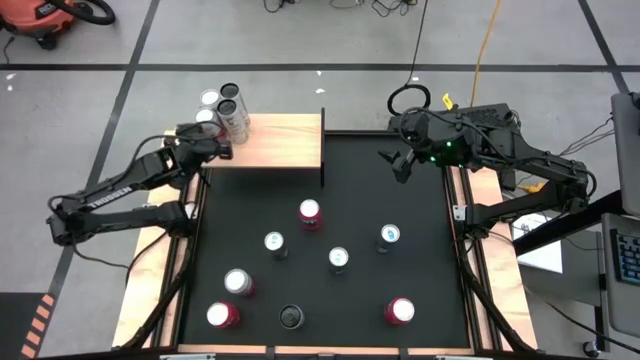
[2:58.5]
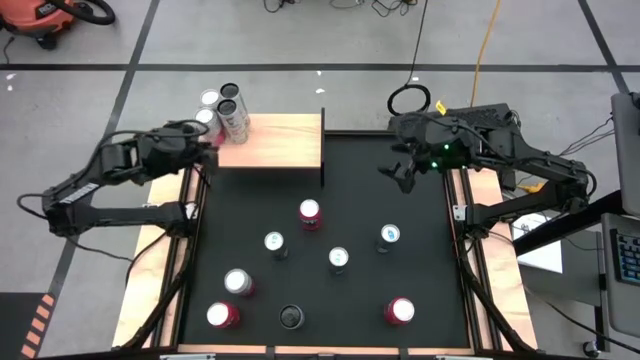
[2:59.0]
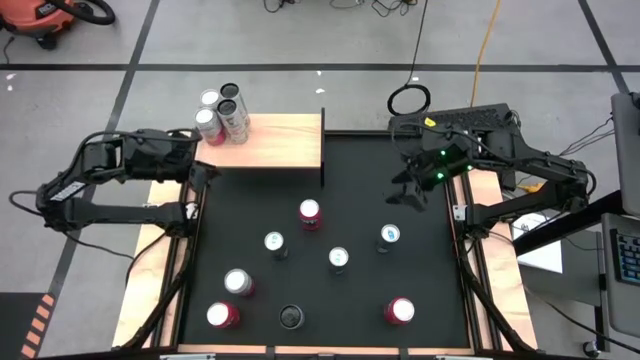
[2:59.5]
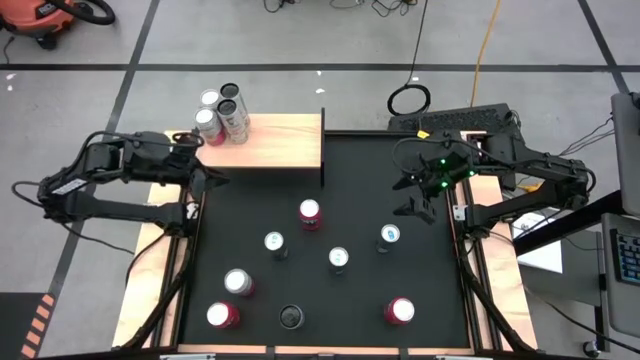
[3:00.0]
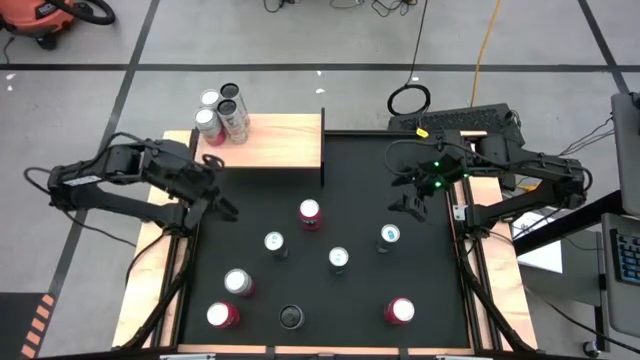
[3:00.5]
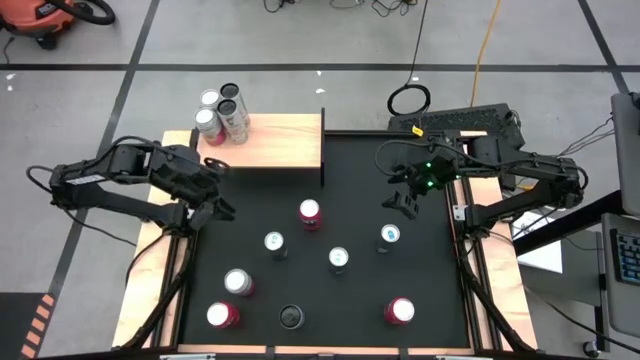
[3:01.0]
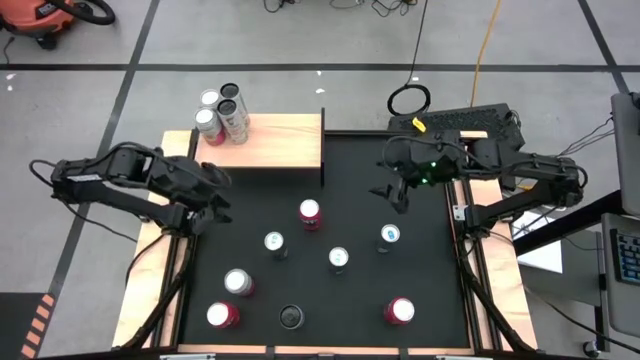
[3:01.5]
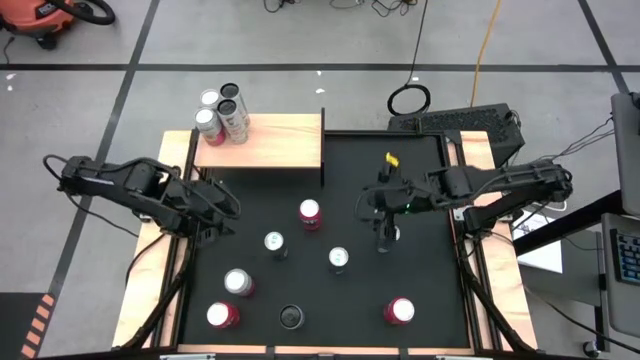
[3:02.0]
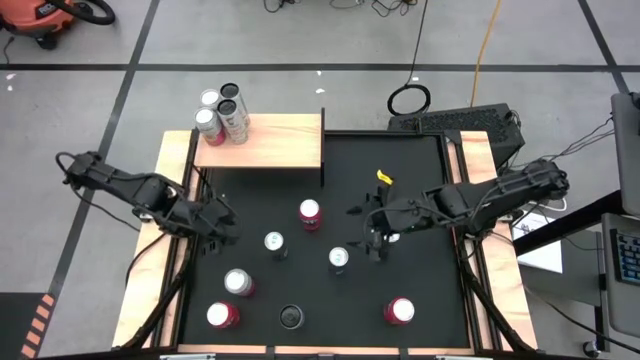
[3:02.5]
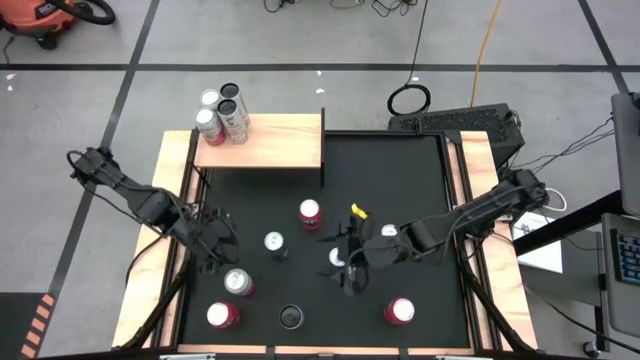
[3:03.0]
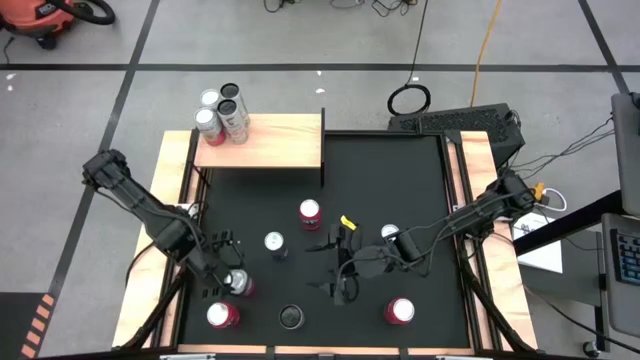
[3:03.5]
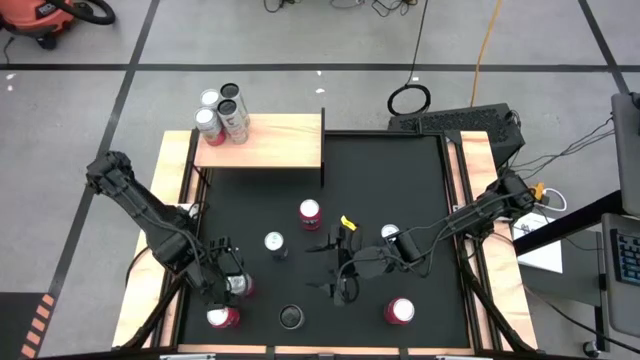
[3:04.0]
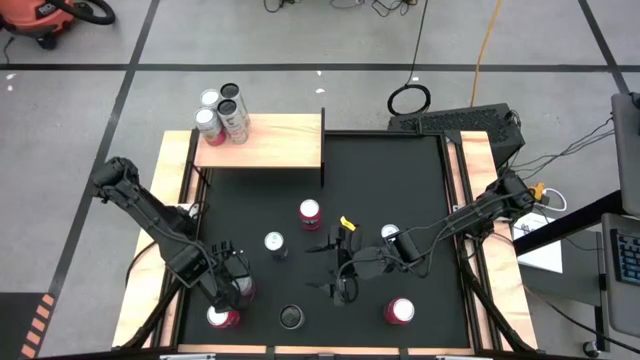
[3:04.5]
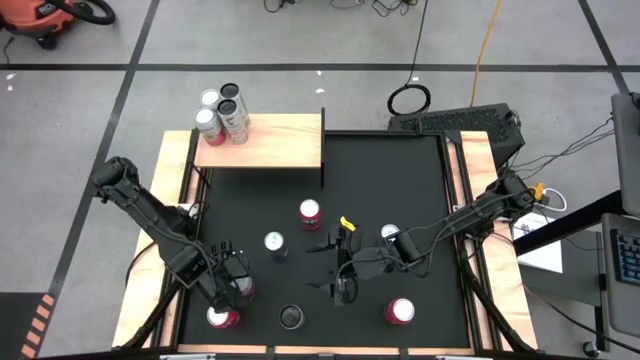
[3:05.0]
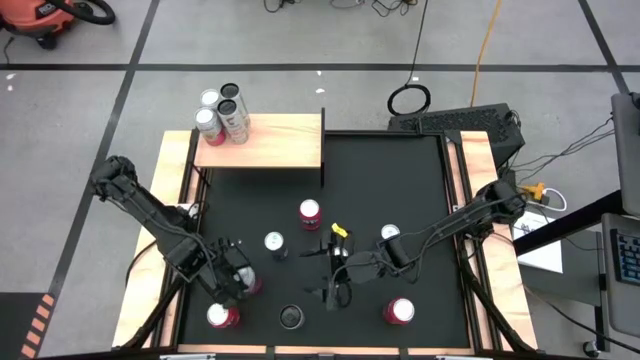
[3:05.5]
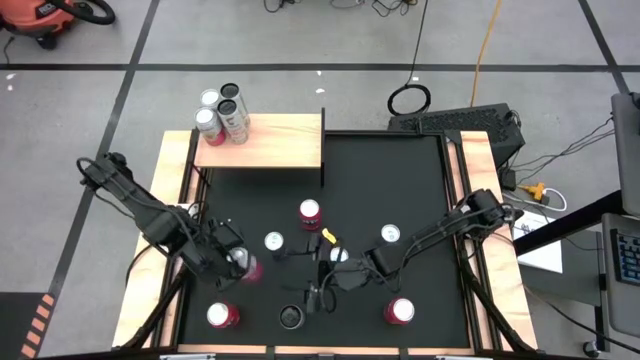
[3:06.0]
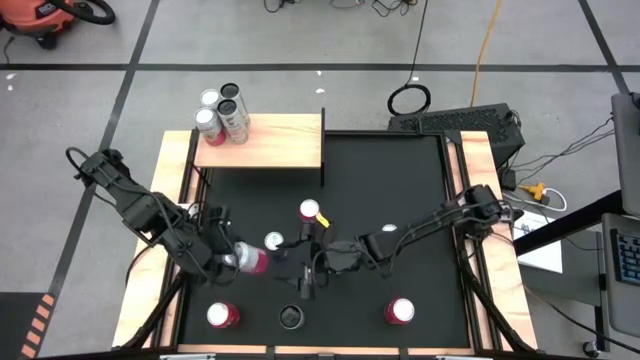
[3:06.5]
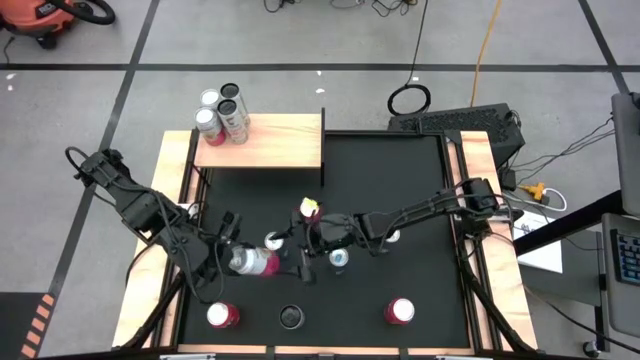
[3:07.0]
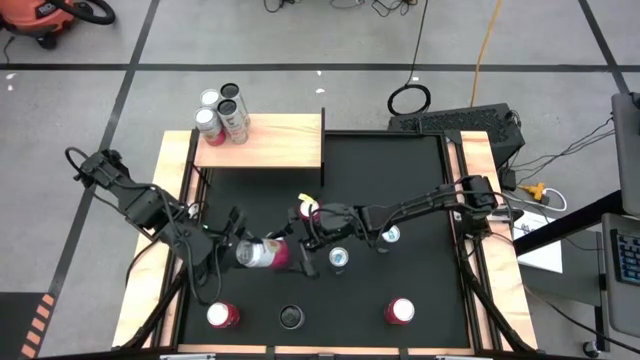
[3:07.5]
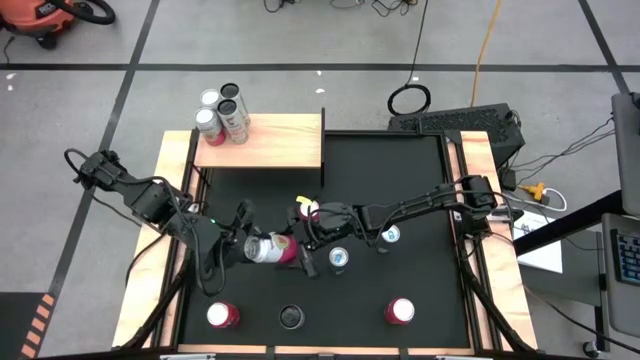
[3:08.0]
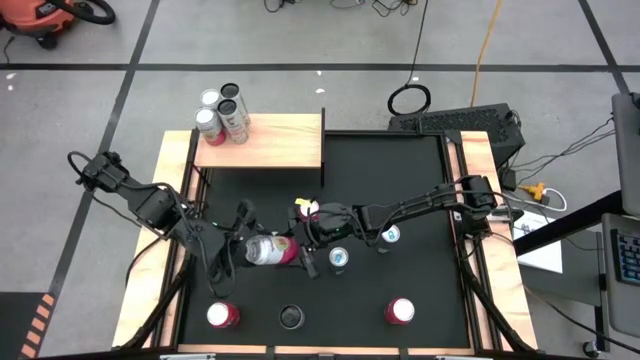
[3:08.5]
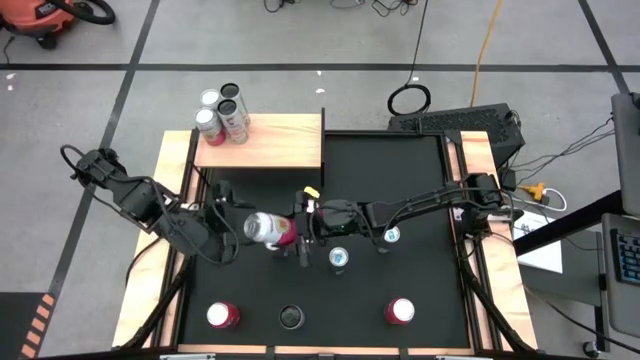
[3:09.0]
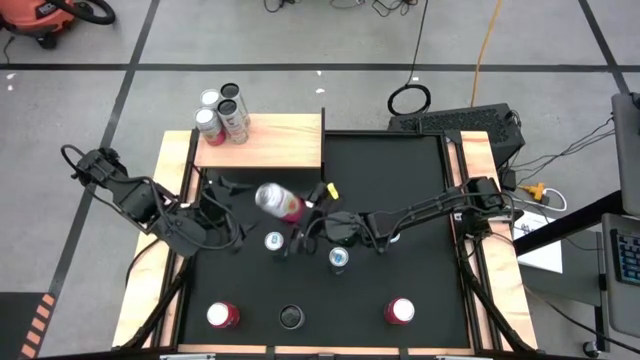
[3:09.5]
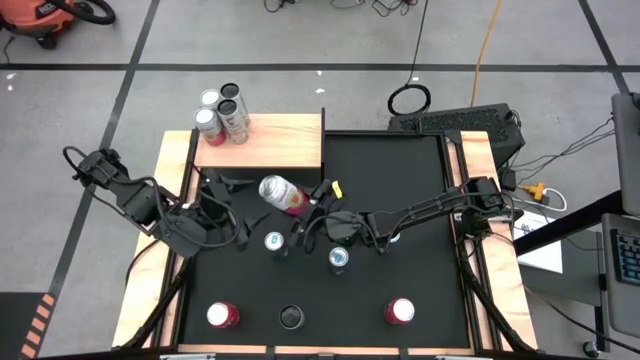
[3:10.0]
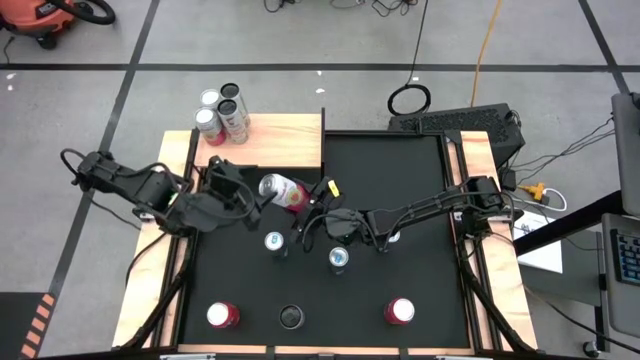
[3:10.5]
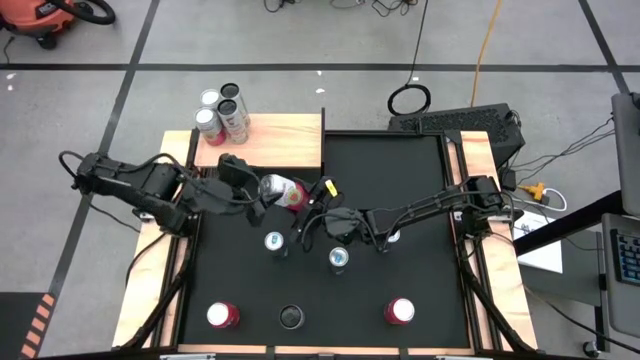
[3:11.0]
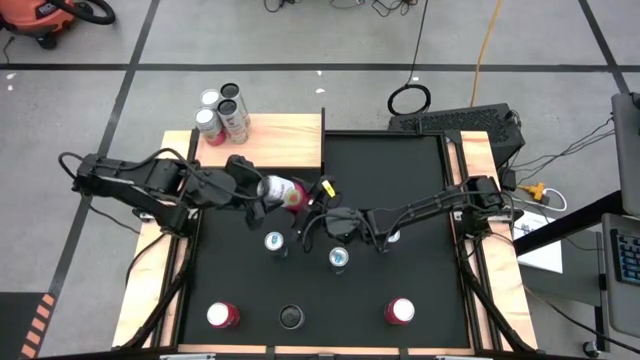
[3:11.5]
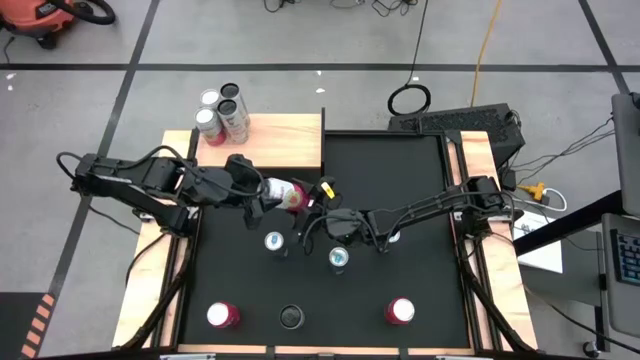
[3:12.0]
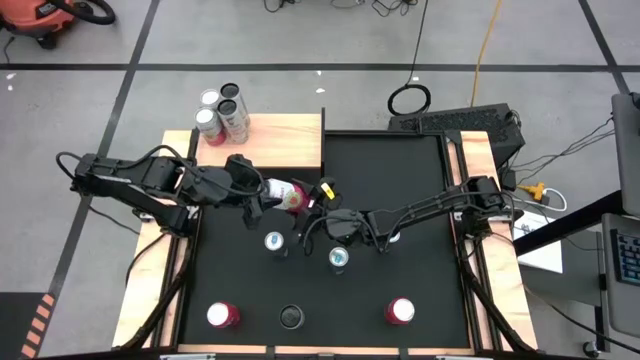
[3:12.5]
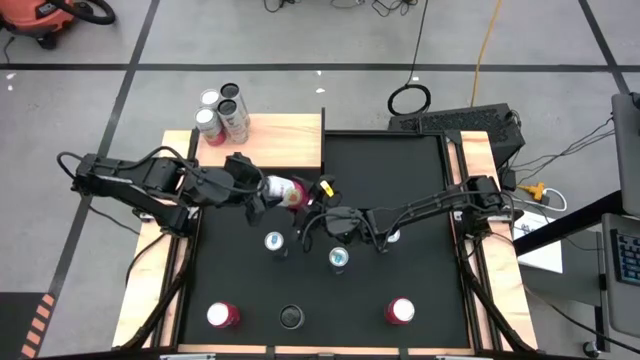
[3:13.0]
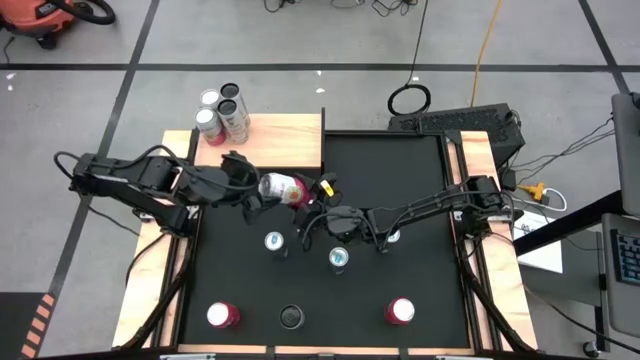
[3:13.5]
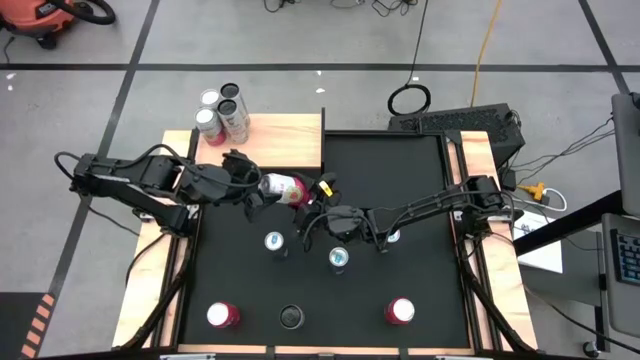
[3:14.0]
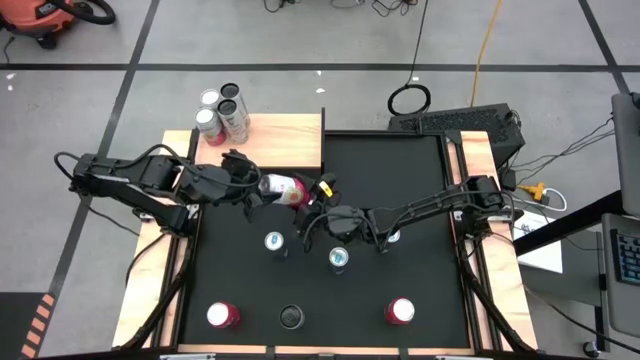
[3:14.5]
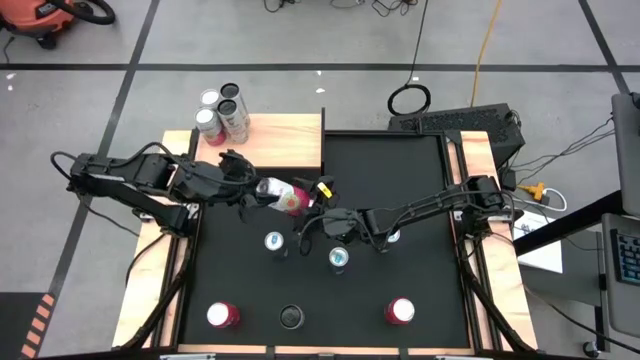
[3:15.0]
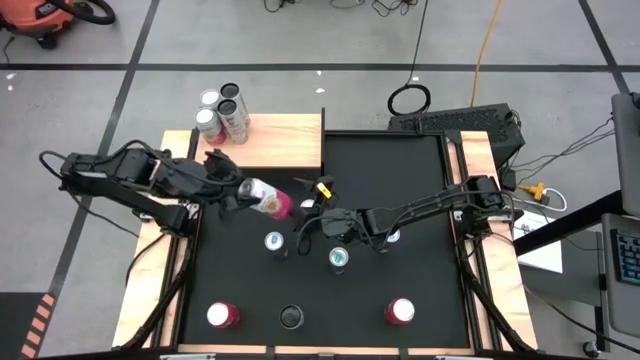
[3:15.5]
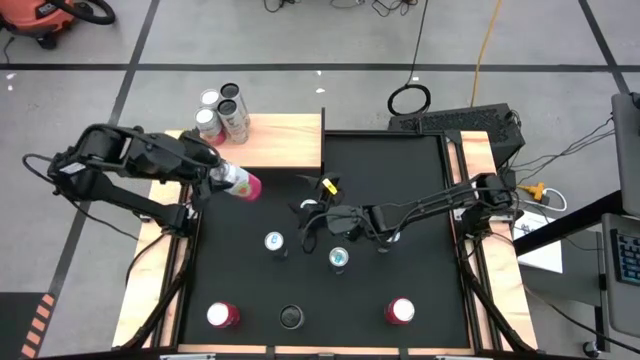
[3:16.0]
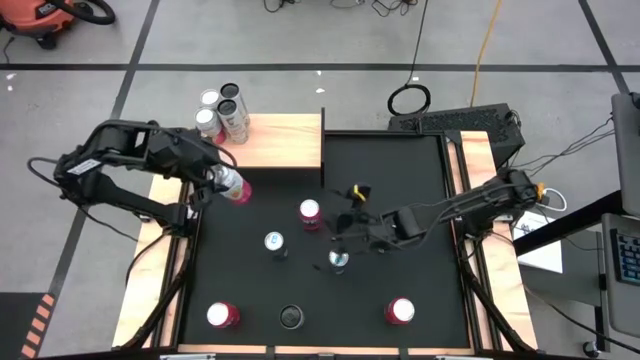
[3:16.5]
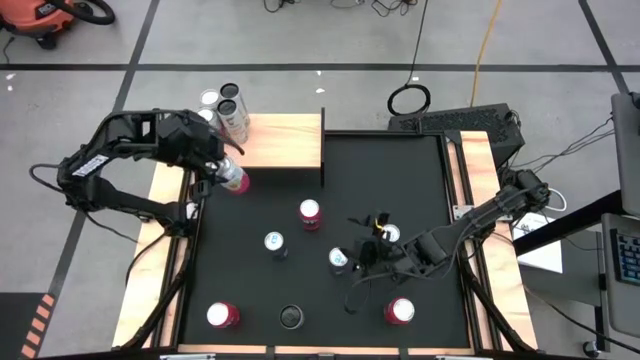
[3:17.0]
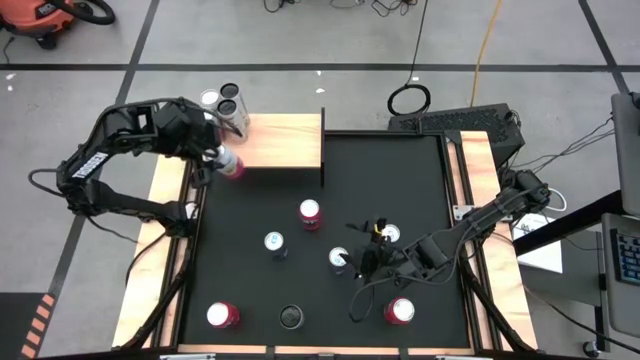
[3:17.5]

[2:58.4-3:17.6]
Task: Place canned beverage on shelf
Put the pink soda can on the shelf aligned with the other pink soda cans

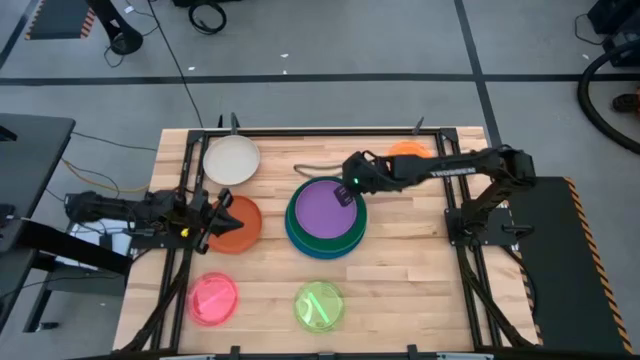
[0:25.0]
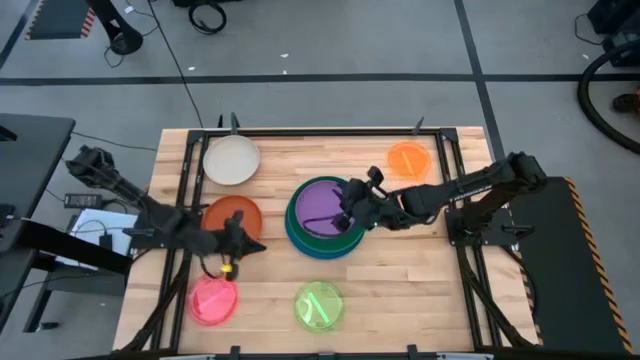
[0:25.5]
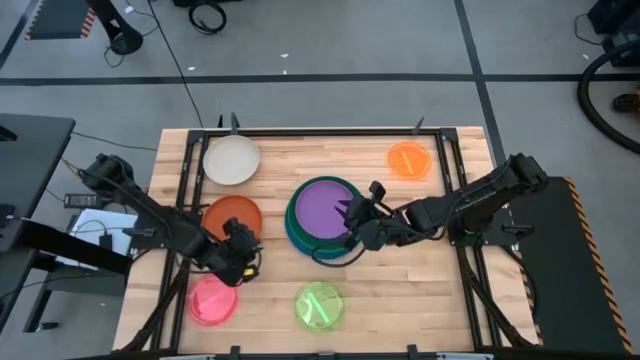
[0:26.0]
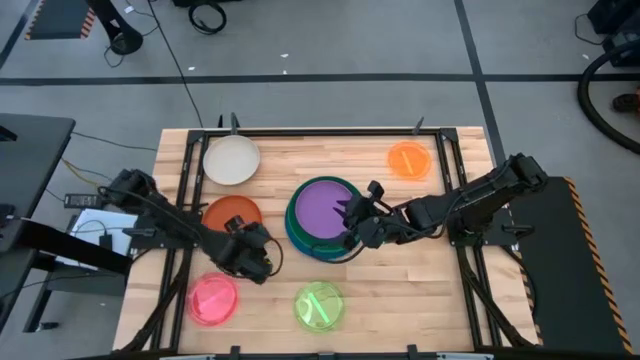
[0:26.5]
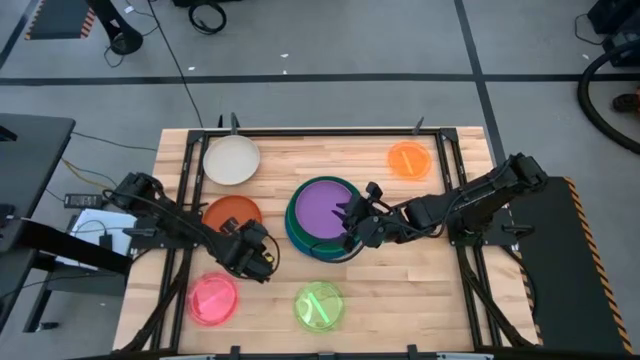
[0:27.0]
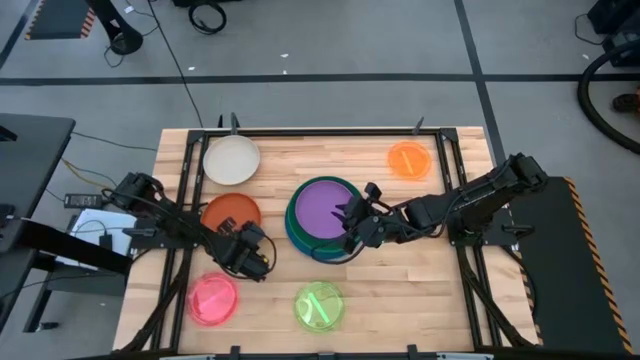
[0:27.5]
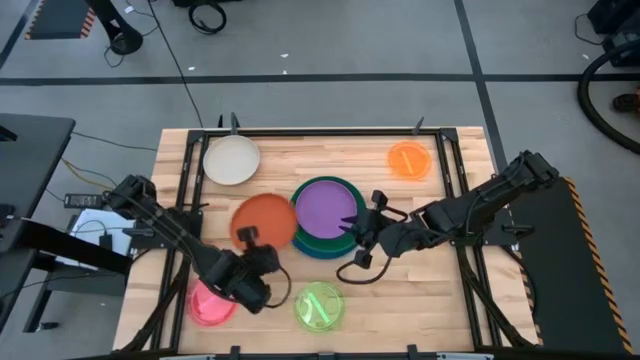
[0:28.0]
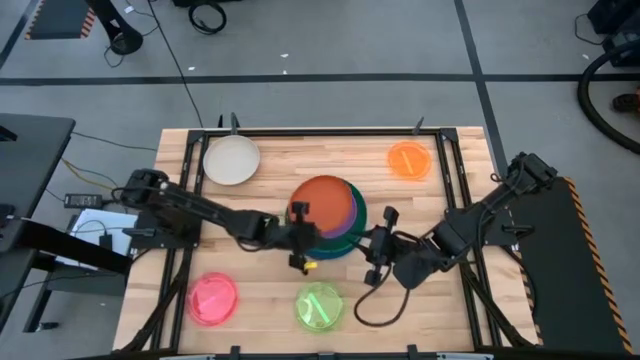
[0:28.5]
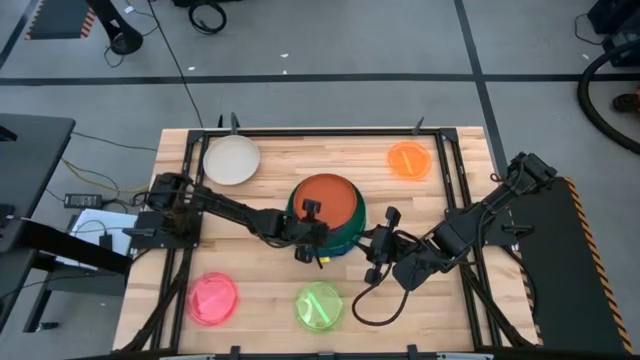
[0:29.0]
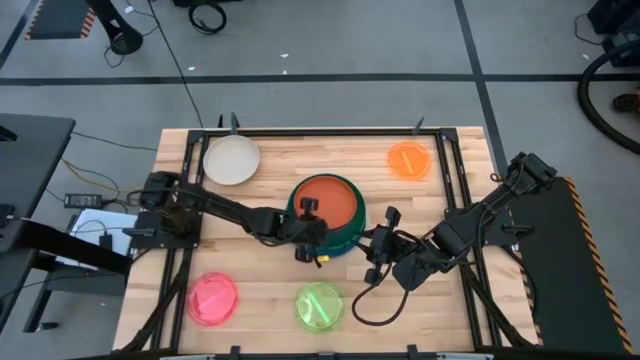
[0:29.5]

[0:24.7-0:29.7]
Task: Stack plastic plates
Stack the orange plate on top of the purple plate
